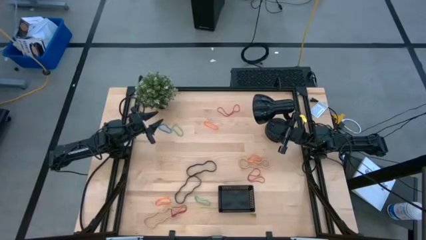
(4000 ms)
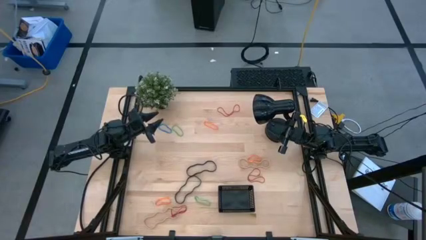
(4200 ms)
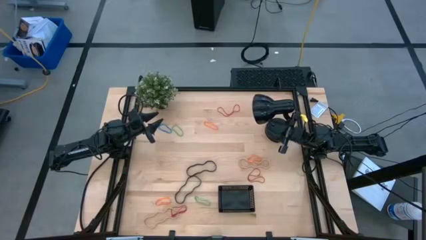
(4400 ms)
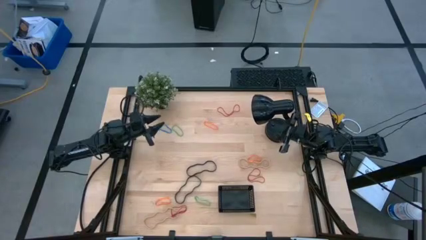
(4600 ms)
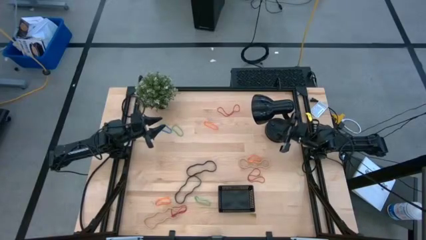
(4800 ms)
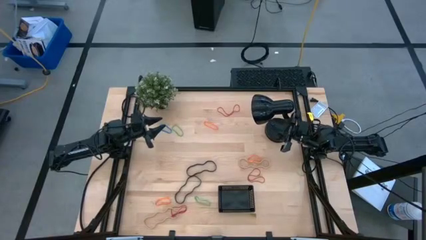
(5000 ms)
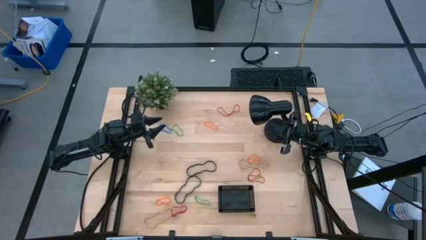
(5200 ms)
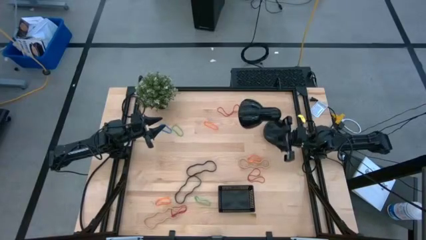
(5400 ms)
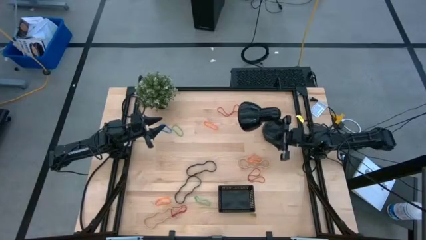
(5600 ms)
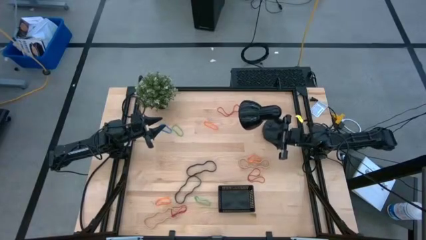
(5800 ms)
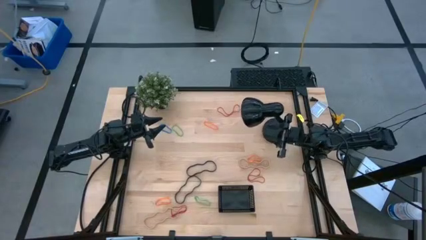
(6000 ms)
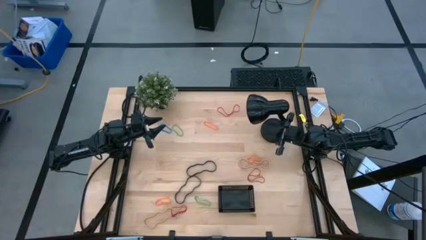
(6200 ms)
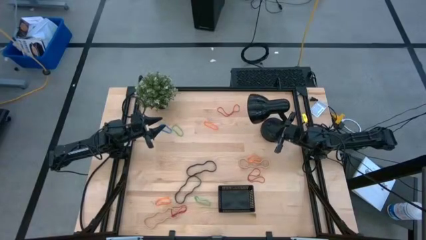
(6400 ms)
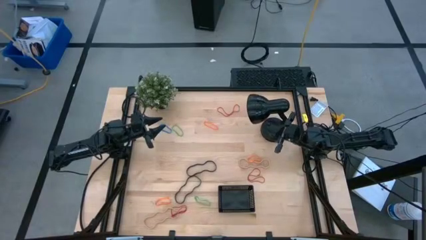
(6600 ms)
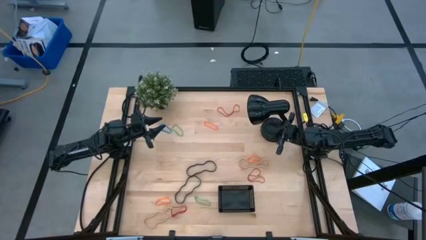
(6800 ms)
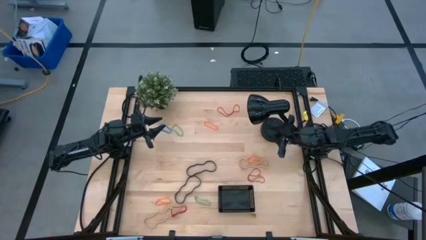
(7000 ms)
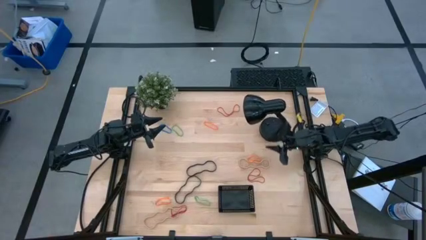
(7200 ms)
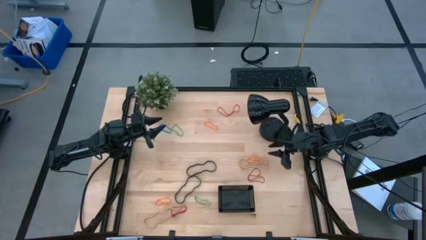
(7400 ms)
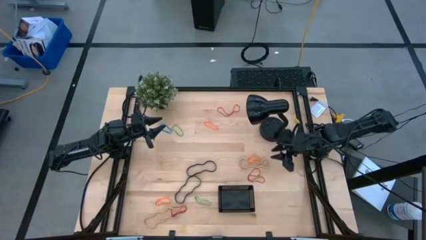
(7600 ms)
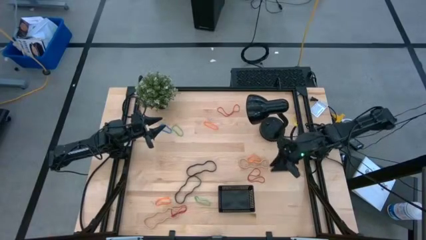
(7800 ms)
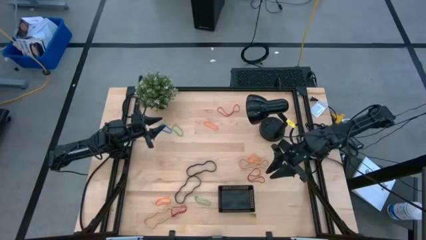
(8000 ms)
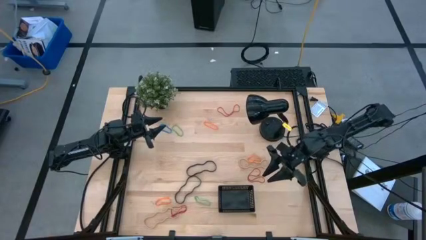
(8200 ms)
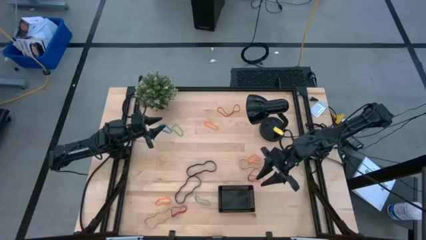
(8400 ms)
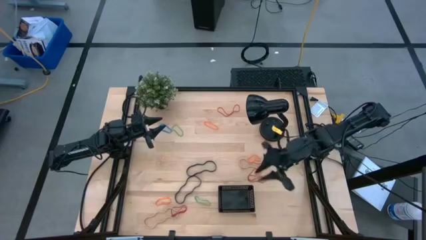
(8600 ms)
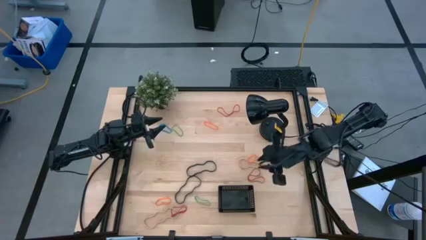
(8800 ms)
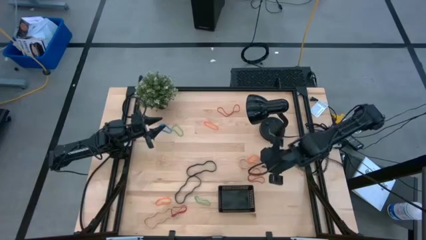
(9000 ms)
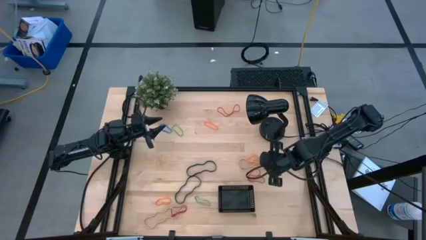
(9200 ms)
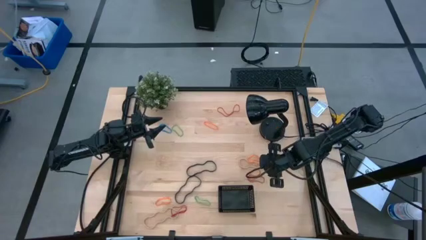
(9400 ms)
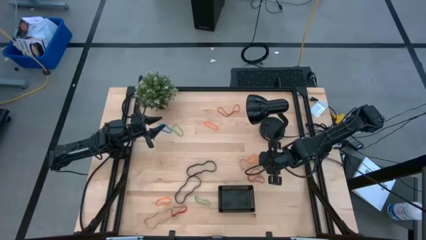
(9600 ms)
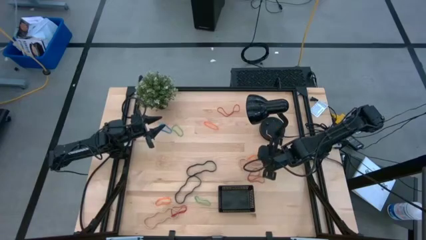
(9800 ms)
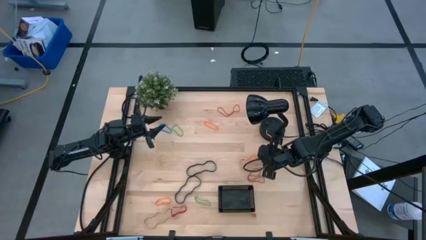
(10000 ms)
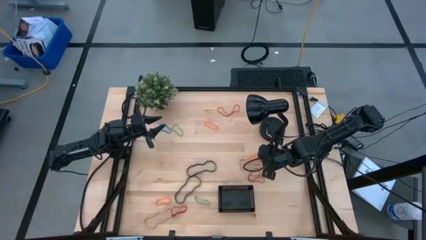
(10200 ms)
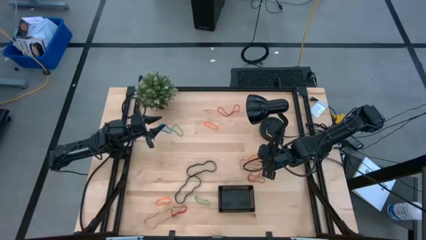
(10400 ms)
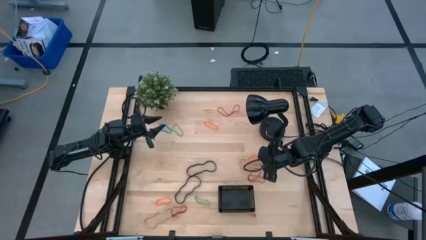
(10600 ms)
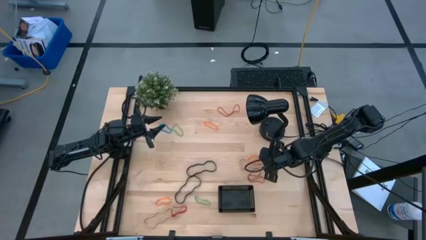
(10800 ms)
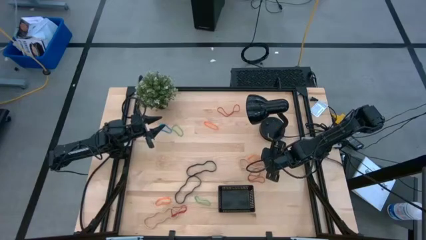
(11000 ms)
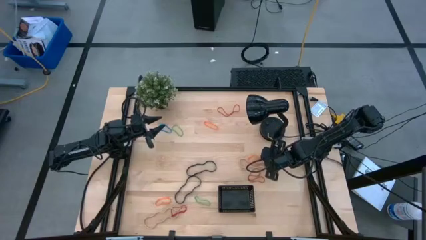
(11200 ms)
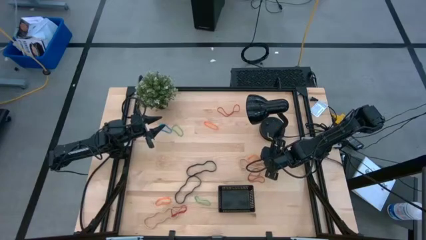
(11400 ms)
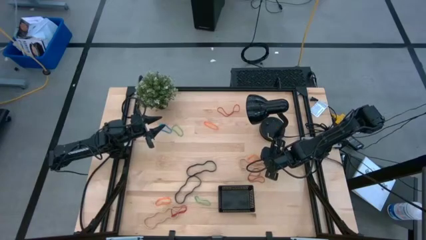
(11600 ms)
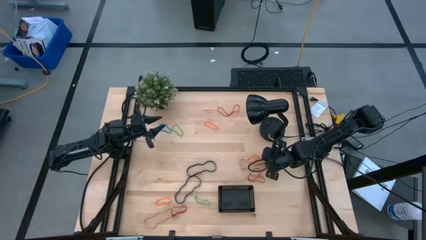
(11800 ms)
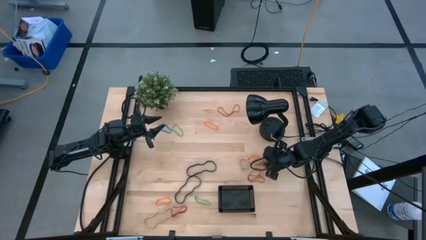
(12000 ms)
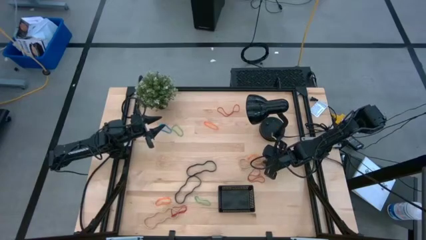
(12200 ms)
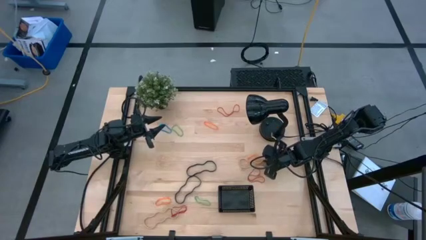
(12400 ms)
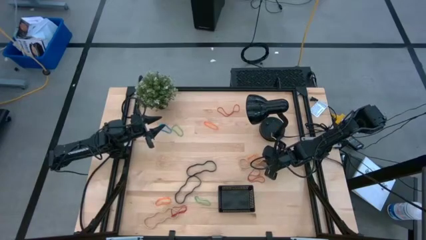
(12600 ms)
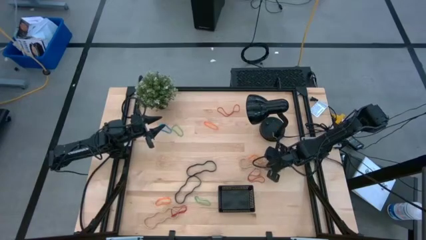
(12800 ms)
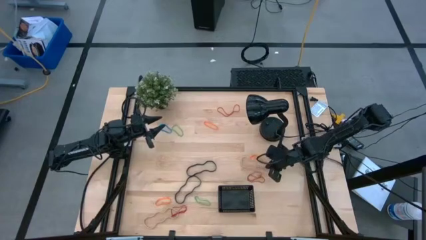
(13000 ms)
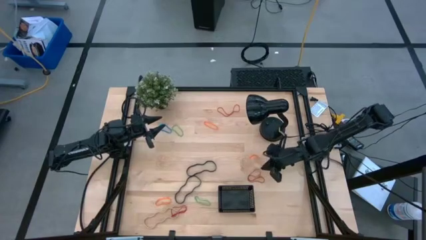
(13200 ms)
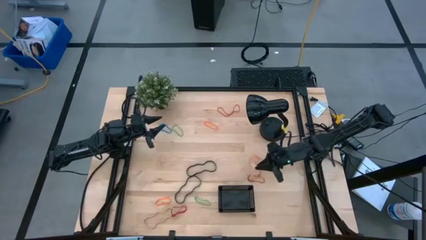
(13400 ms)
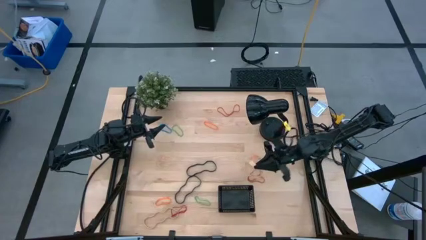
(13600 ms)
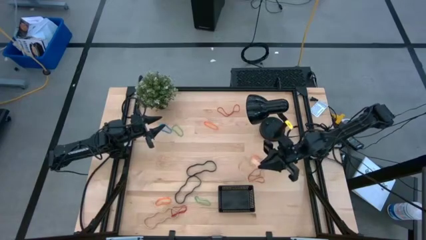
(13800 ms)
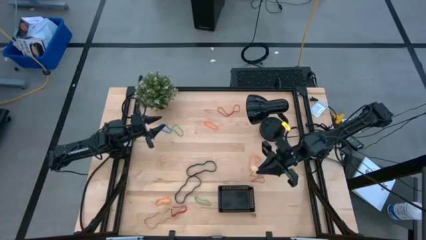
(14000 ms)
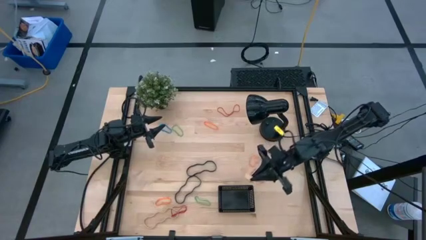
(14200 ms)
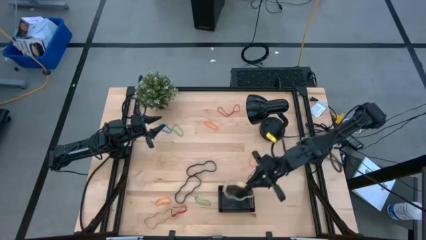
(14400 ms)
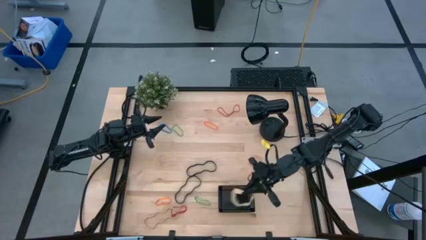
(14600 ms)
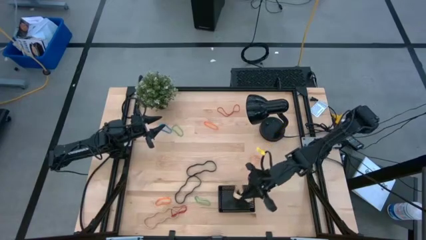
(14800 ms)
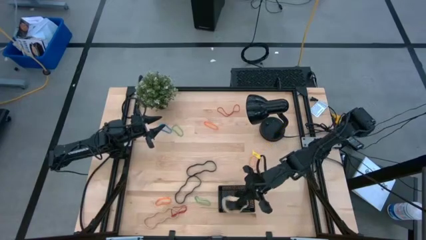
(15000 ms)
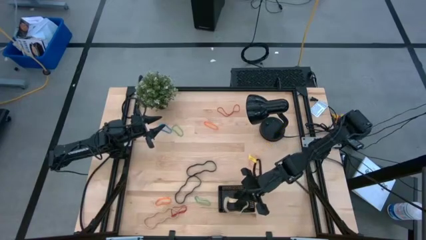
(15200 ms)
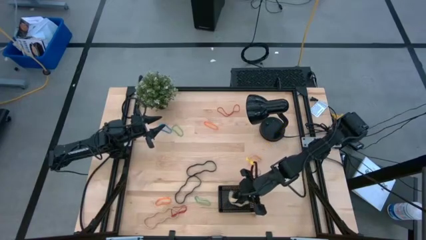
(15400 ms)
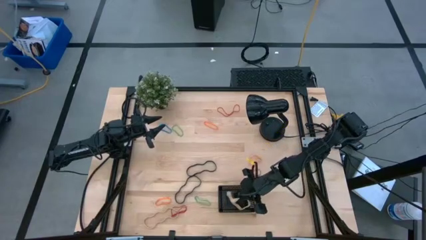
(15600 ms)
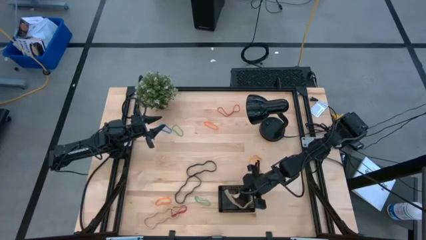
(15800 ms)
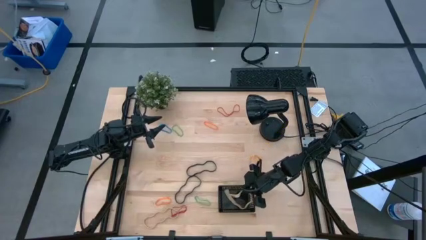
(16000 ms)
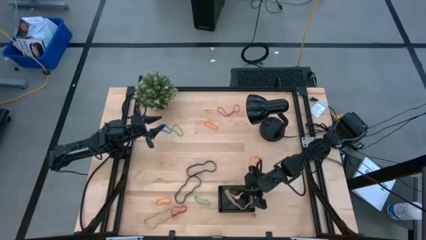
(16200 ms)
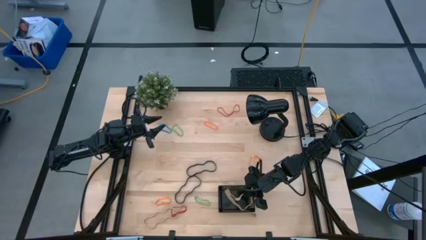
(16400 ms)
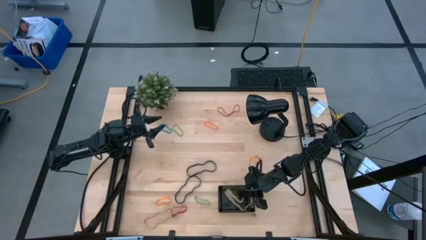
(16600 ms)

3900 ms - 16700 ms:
Task: Pick and place rubber bands into bin
Put the top brown rubber band into the black bin

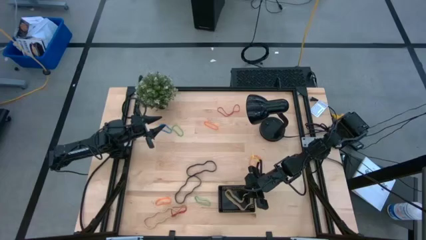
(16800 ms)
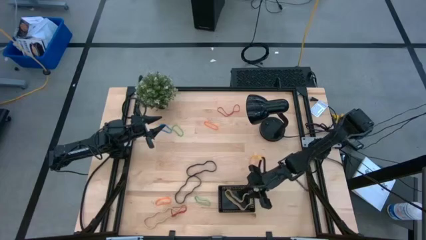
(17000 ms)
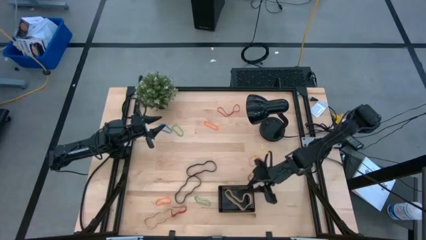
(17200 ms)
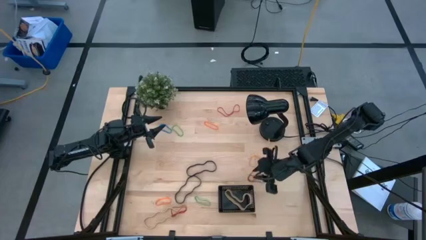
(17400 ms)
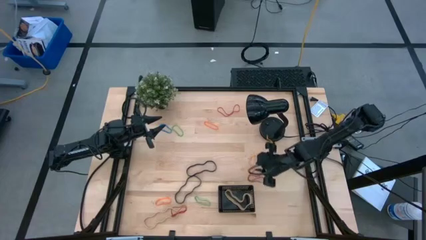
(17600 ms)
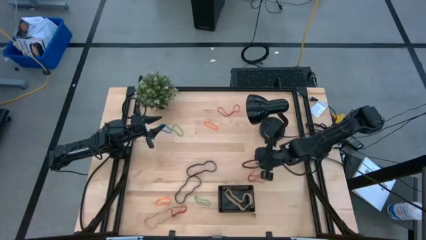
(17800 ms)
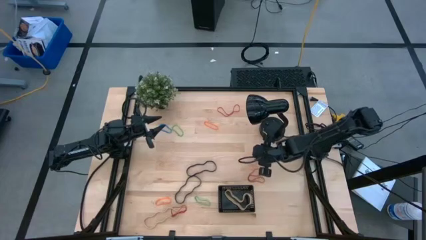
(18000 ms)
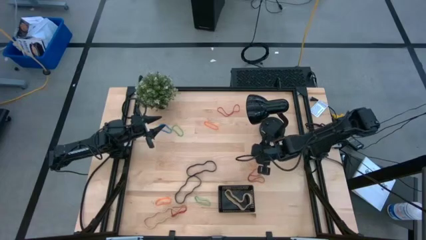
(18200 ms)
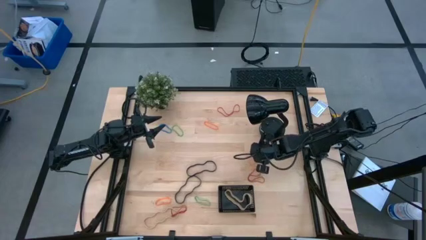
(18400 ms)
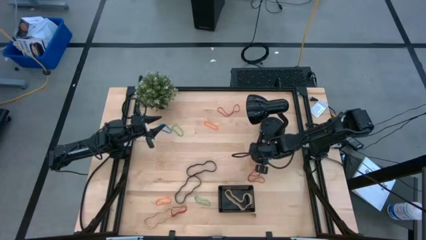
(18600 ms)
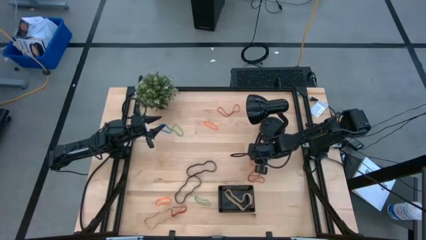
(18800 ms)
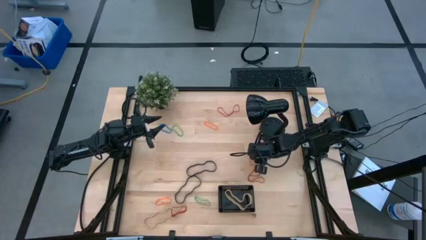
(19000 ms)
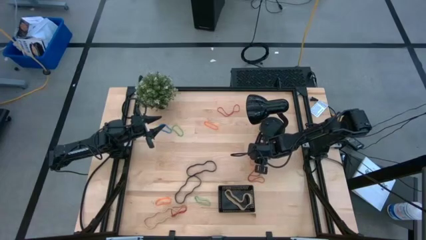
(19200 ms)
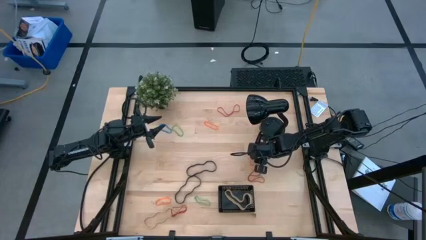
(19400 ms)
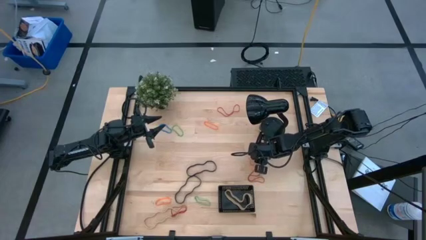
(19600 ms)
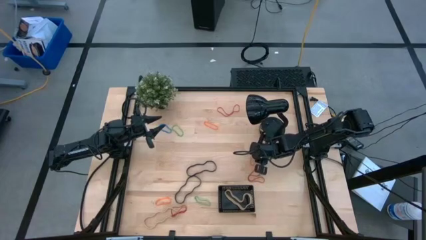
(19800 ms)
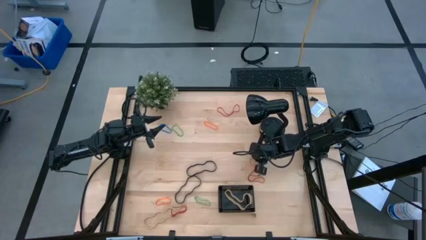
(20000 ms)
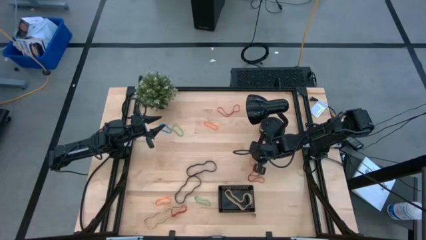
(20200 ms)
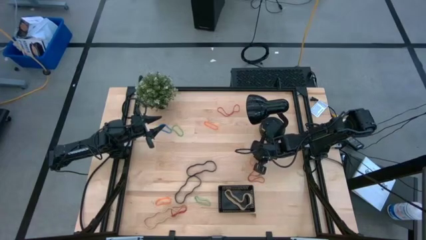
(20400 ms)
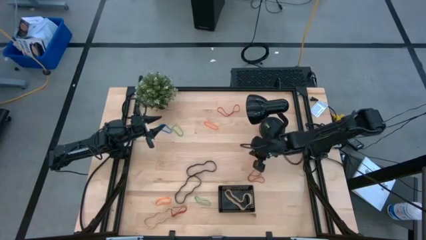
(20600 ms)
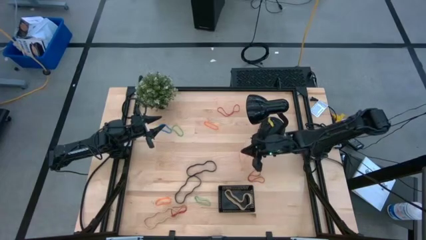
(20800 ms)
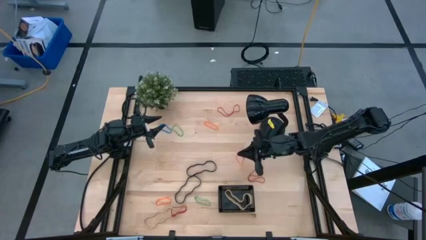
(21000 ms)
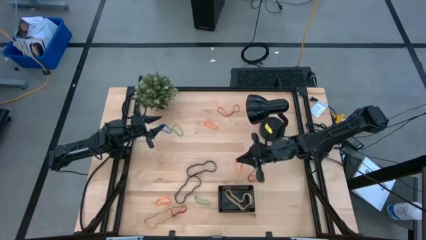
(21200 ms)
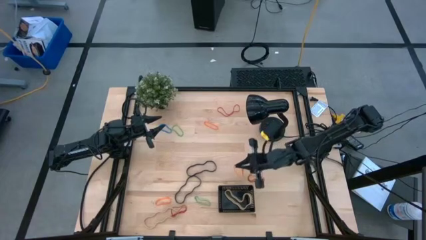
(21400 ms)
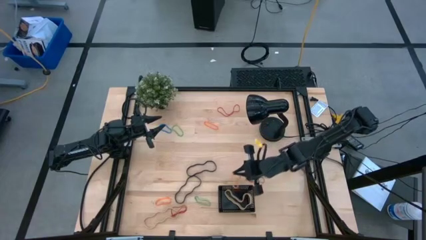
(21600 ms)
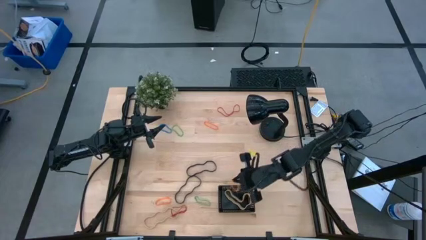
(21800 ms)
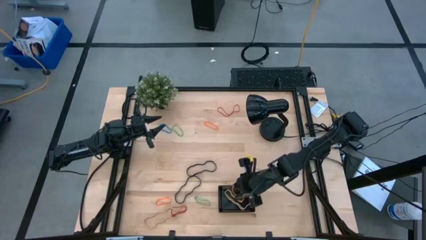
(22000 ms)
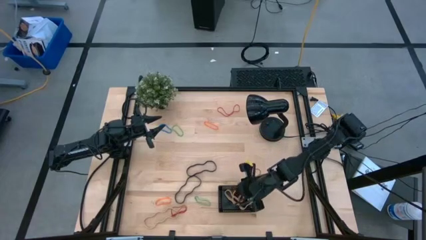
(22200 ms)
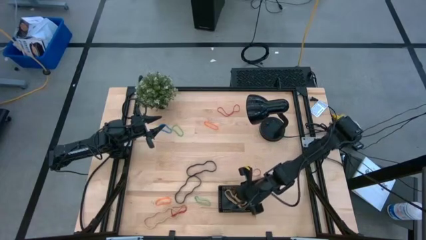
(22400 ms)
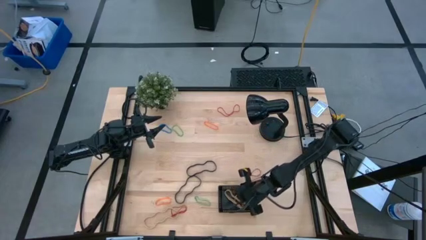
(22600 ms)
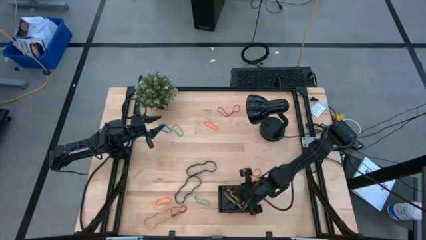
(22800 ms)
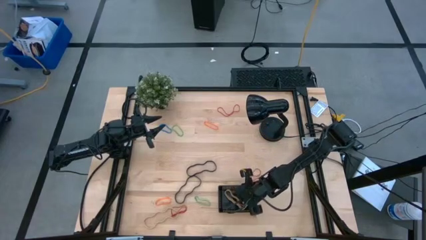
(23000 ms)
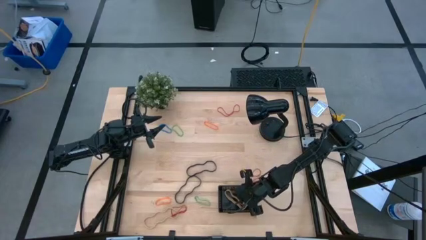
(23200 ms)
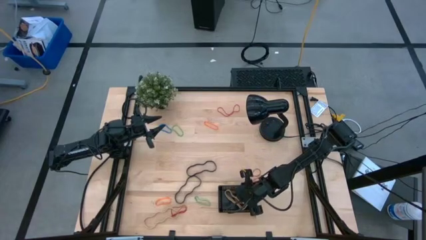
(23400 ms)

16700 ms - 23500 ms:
Put the middle orange rubber band into the black bin
